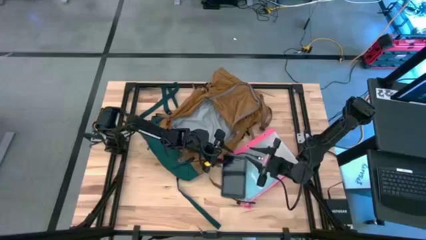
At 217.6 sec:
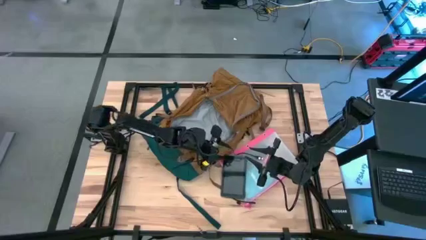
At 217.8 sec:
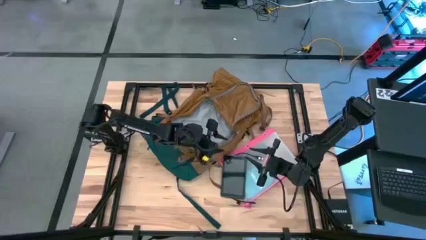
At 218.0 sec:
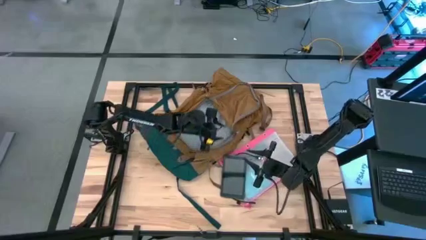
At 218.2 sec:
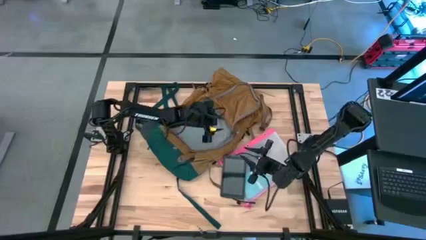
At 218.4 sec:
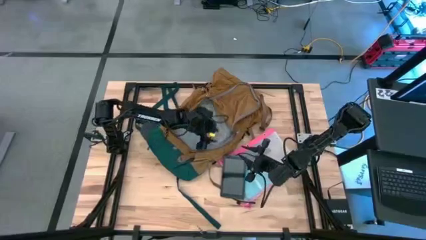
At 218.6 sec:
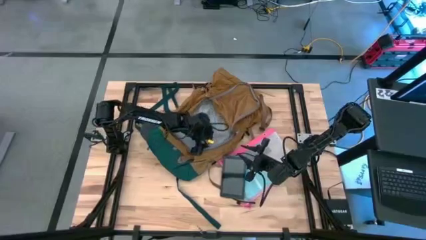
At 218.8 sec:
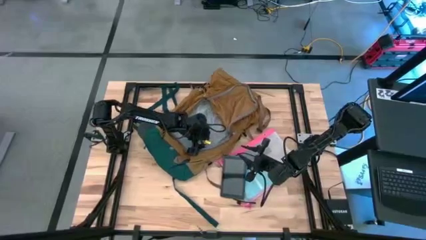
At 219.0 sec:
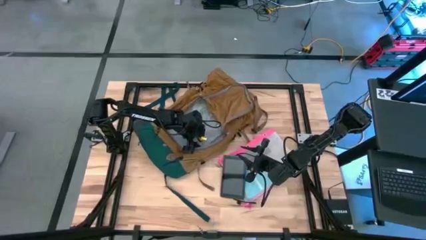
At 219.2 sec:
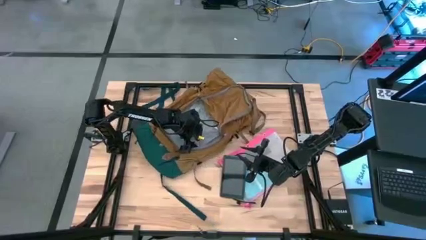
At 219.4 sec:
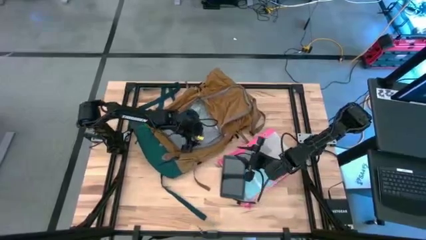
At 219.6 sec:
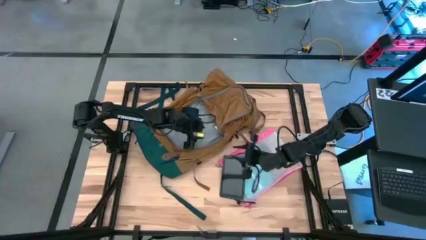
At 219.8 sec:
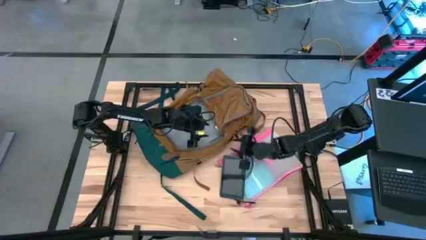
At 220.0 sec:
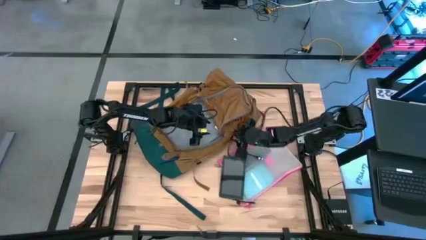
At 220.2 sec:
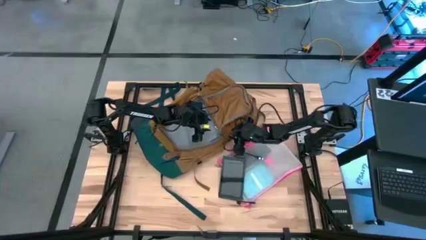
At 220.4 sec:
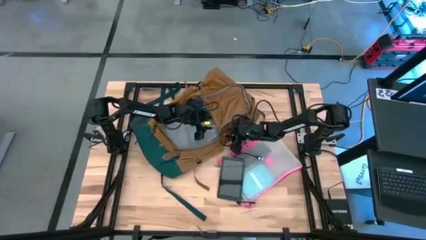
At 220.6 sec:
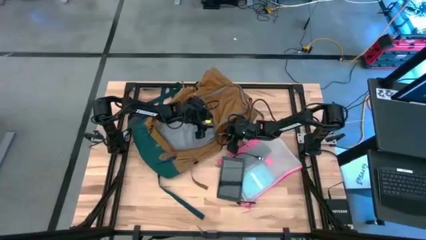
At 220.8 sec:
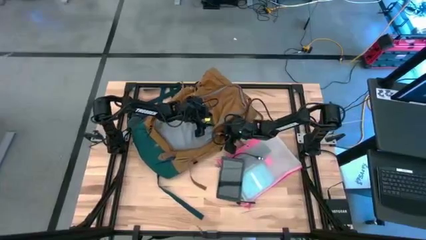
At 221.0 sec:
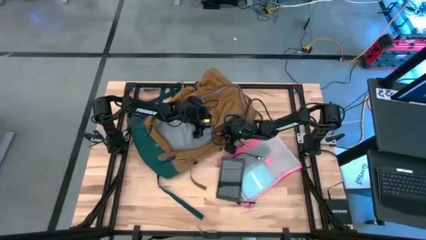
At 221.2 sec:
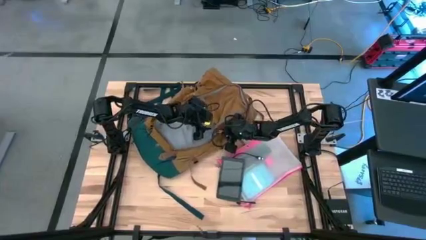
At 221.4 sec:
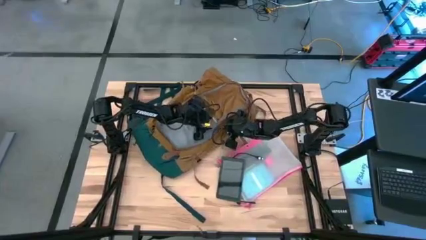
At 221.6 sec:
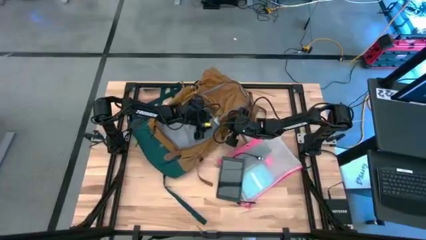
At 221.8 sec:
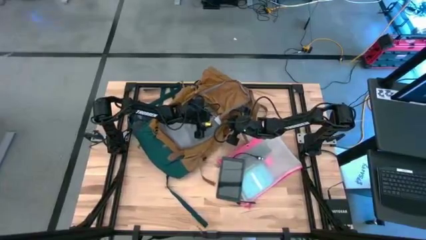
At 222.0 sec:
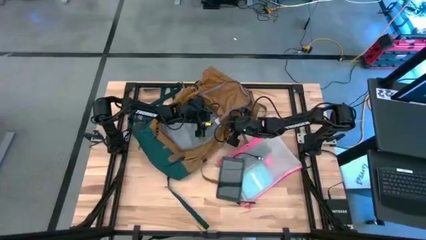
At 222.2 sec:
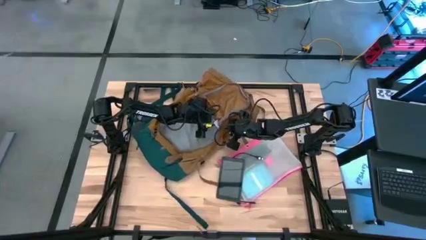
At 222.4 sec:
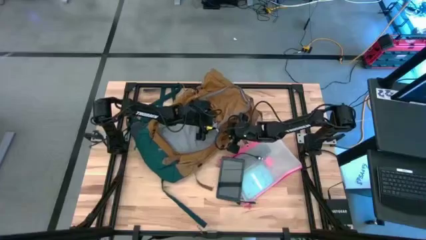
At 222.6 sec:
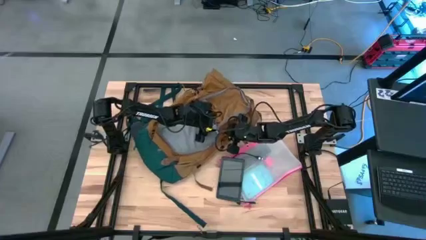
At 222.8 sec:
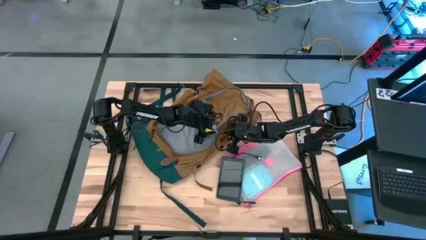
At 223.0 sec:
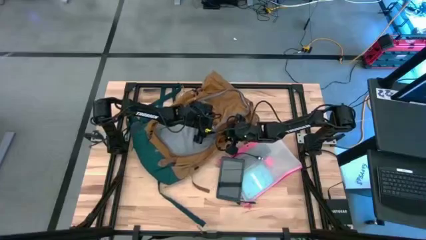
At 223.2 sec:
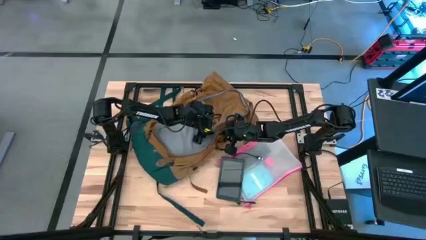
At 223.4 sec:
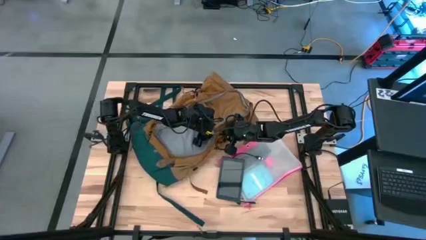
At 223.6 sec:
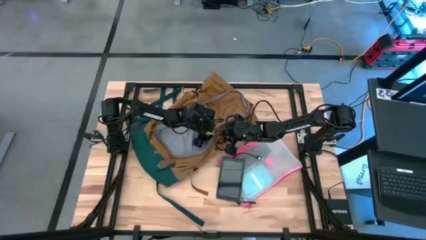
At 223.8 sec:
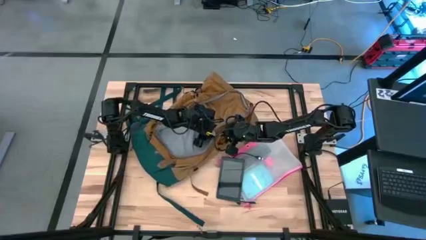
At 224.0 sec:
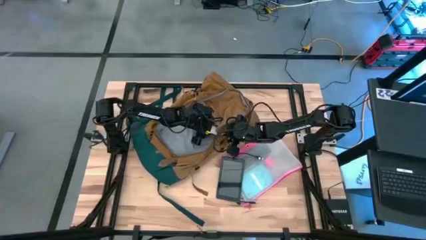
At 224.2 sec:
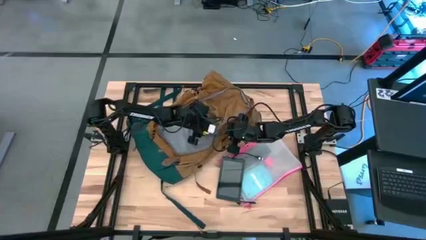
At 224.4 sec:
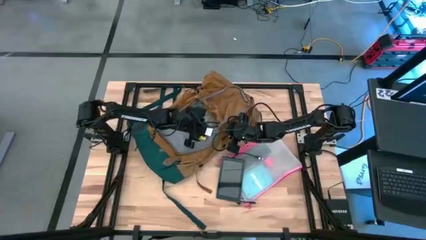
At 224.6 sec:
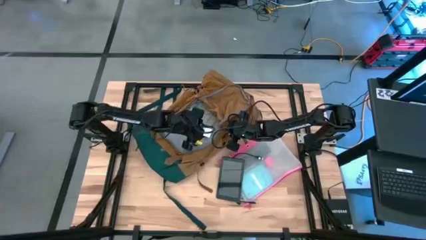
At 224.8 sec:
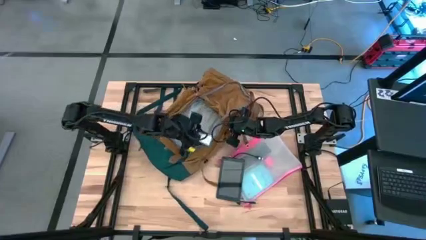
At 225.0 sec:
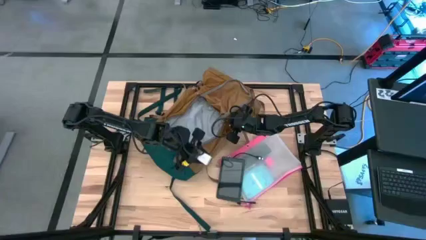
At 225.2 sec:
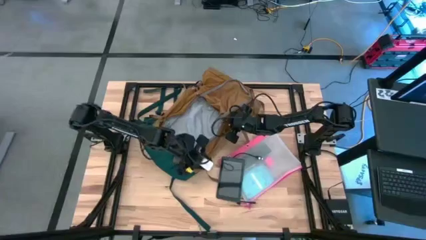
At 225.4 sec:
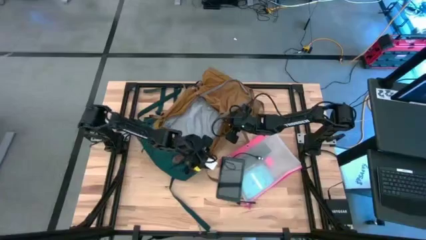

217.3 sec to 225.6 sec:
Task: Unpack backpack
Remove the white charger adapter from the brown backpack

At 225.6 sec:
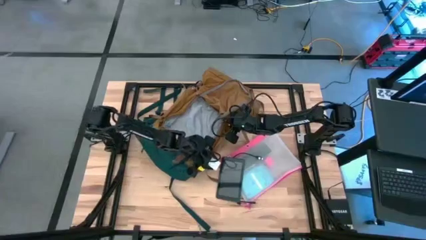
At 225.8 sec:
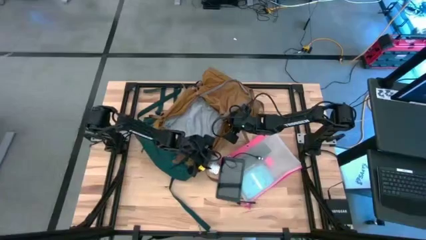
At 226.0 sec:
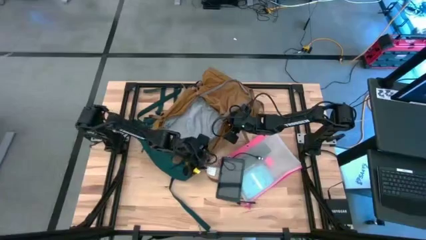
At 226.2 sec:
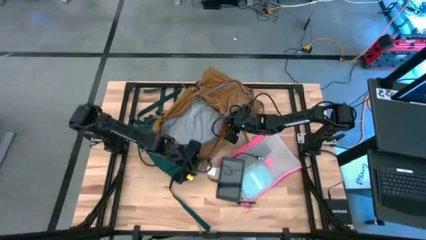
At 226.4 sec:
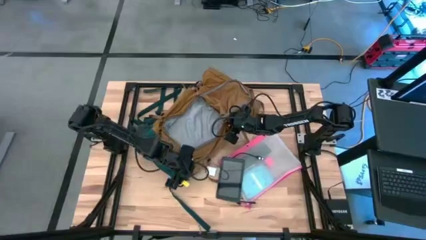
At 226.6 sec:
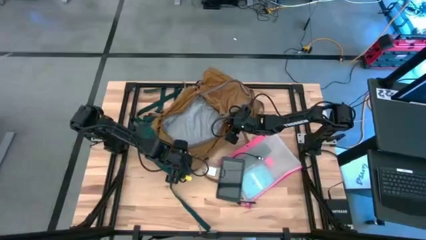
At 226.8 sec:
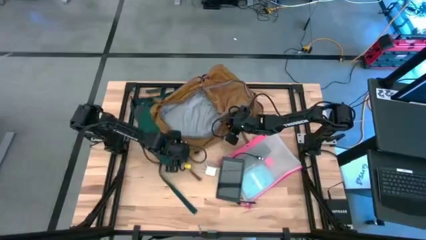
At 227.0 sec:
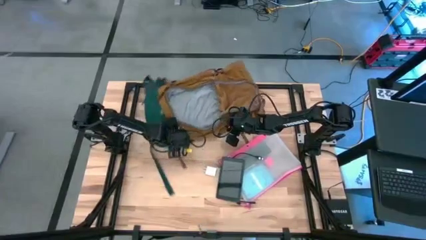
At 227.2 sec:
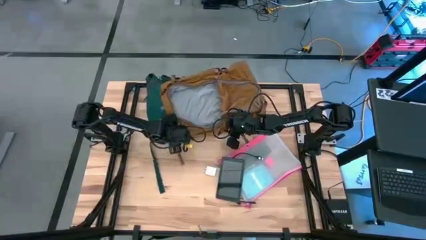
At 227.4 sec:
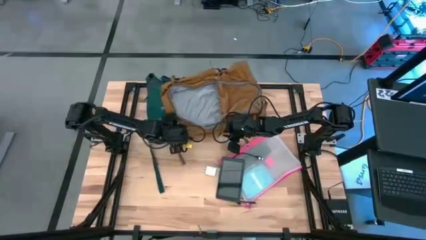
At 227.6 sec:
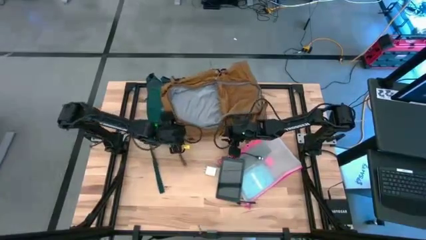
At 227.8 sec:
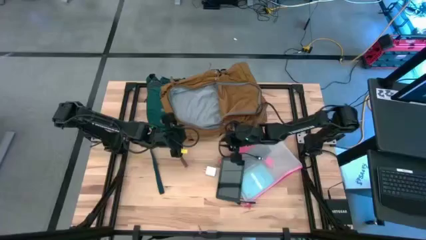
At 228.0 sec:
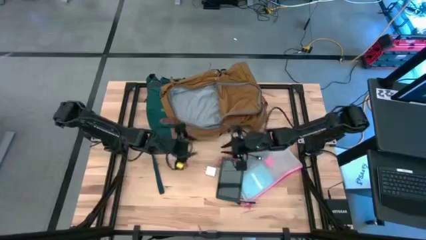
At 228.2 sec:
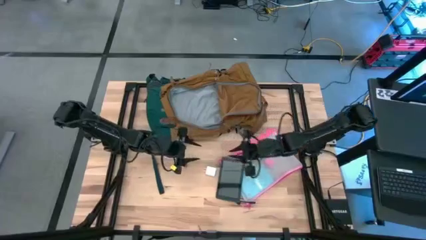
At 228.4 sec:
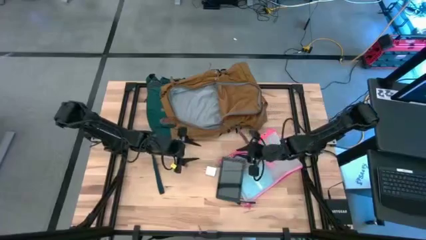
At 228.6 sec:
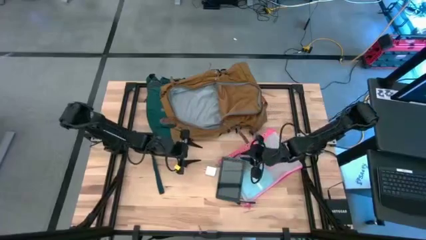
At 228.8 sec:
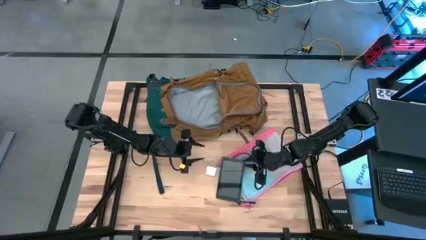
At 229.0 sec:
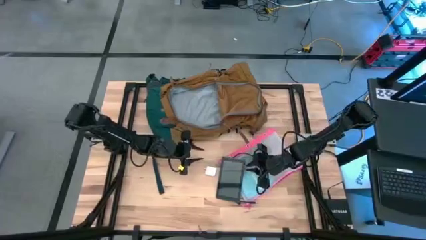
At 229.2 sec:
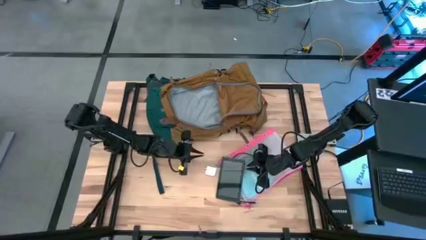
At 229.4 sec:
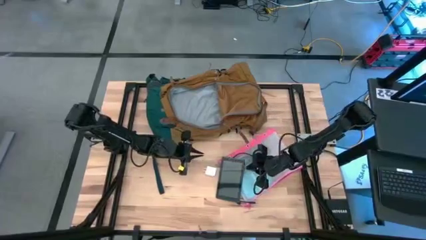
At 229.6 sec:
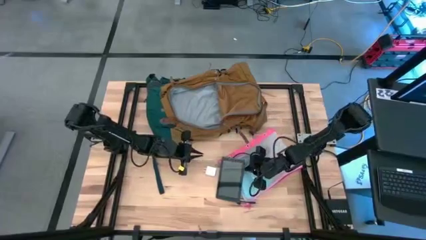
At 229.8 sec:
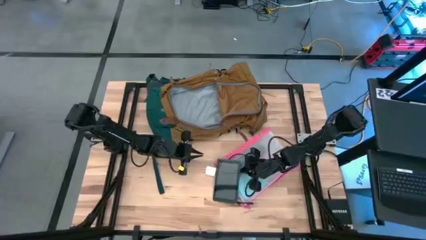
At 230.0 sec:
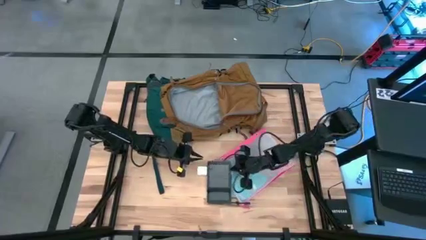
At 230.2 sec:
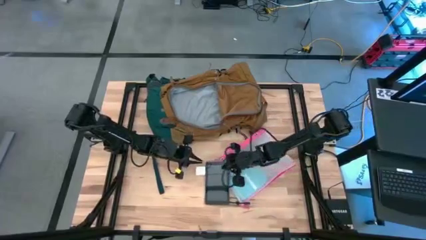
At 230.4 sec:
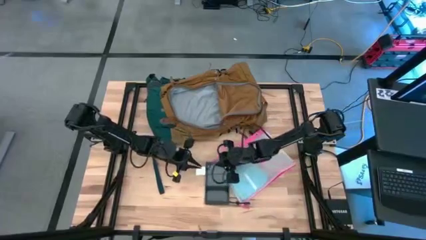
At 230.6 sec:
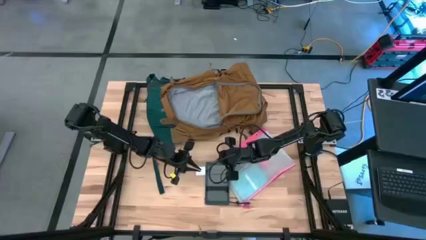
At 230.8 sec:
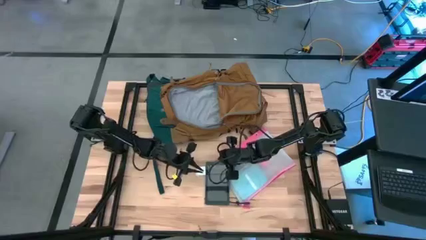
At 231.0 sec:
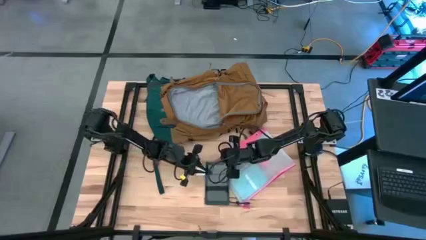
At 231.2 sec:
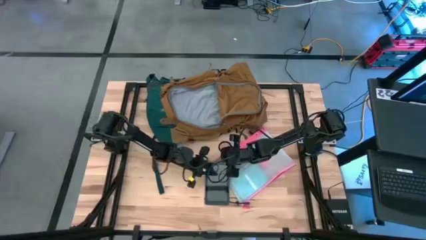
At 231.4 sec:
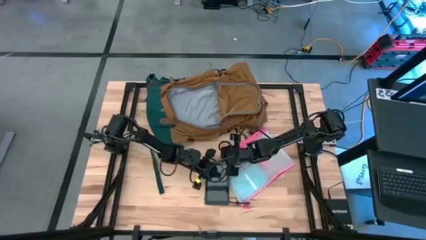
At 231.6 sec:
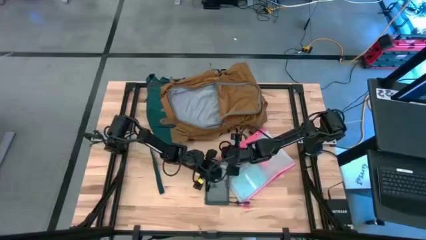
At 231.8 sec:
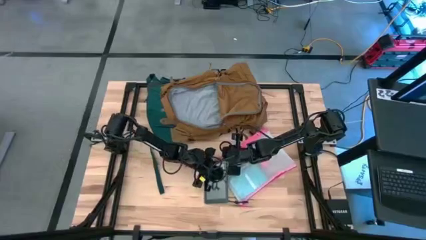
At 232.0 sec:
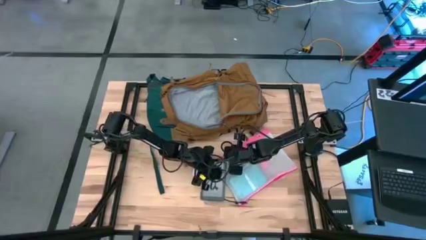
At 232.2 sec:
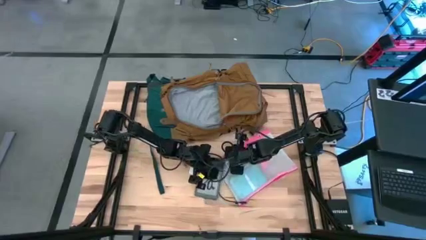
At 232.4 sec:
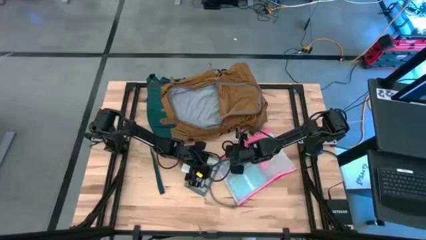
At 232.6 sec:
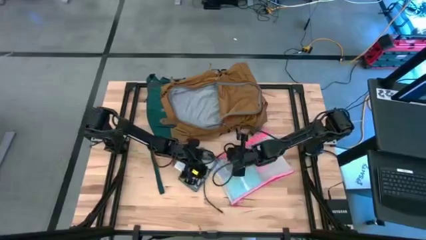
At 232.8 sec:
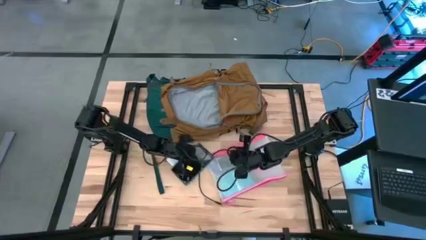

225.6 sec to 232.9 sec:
Adjust the blue tablet
